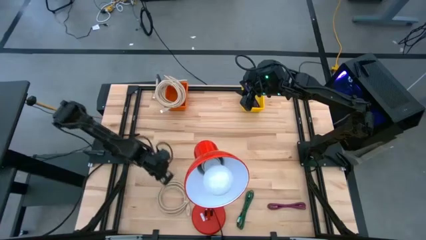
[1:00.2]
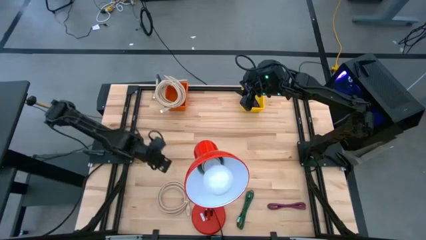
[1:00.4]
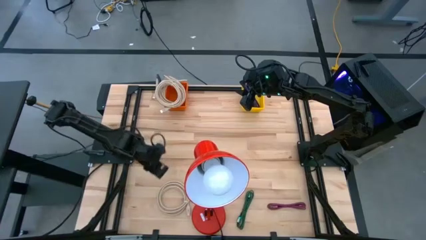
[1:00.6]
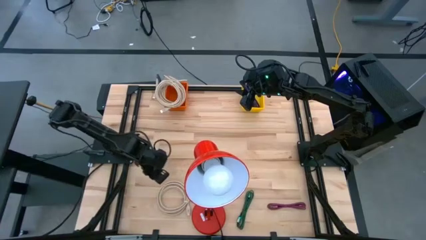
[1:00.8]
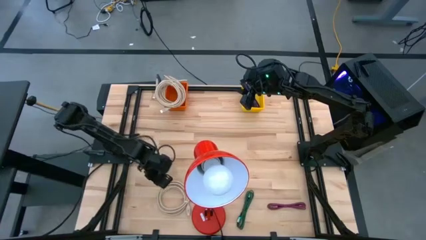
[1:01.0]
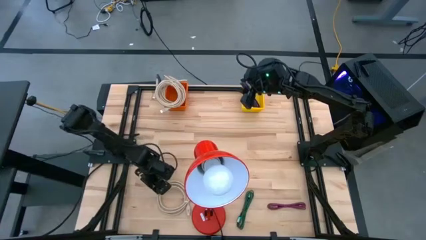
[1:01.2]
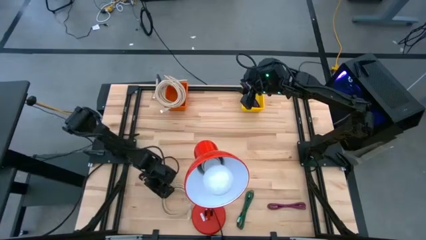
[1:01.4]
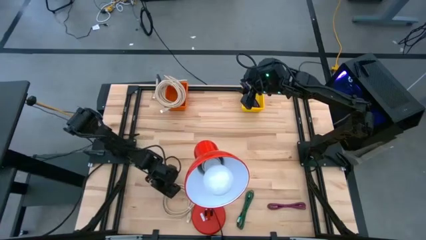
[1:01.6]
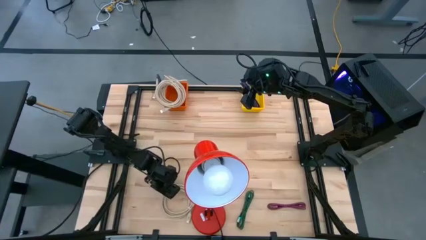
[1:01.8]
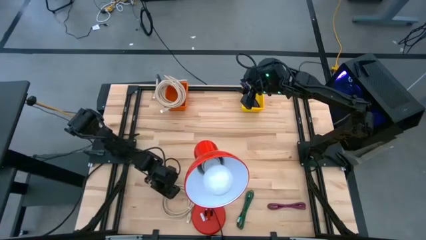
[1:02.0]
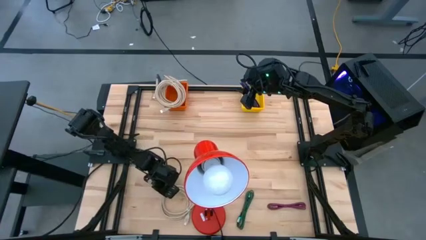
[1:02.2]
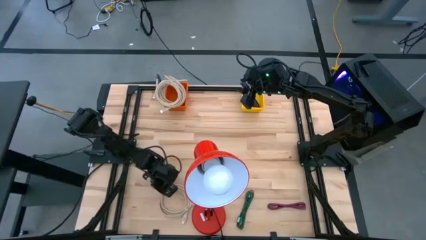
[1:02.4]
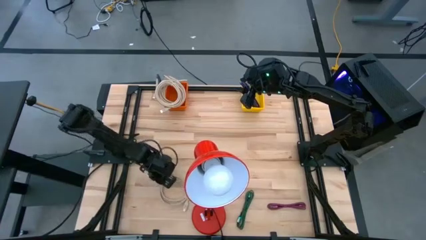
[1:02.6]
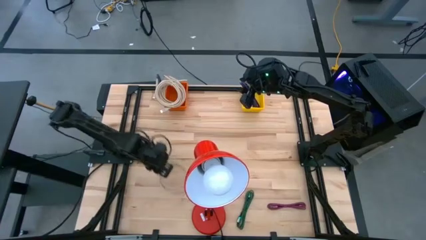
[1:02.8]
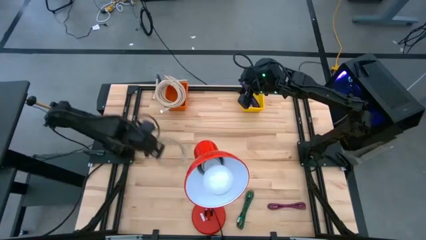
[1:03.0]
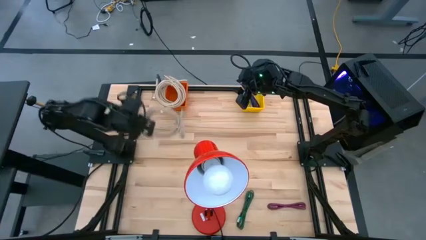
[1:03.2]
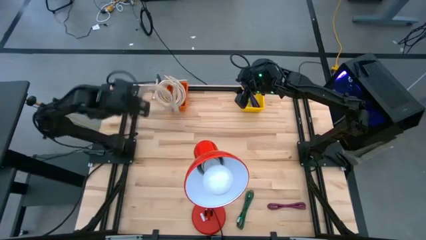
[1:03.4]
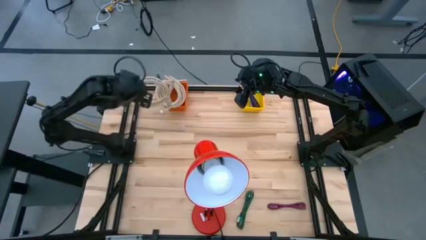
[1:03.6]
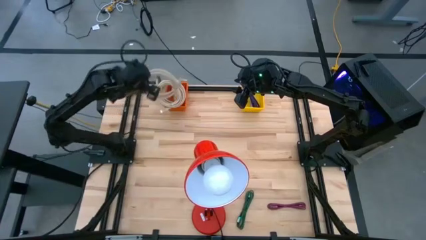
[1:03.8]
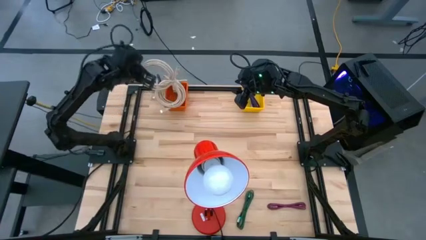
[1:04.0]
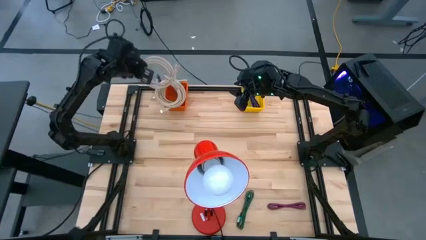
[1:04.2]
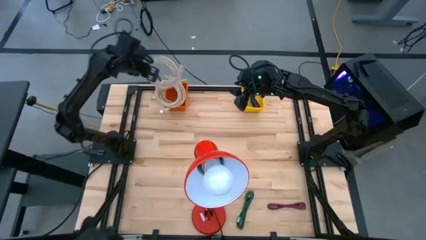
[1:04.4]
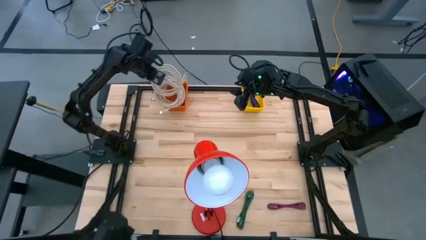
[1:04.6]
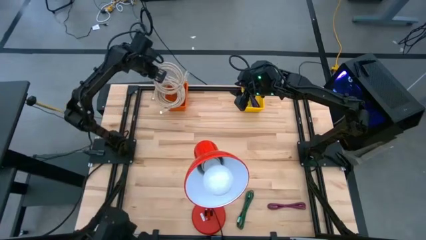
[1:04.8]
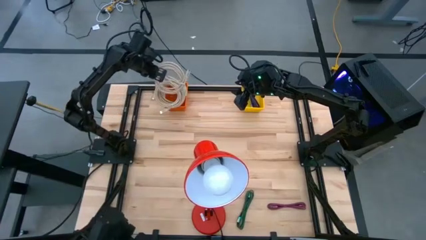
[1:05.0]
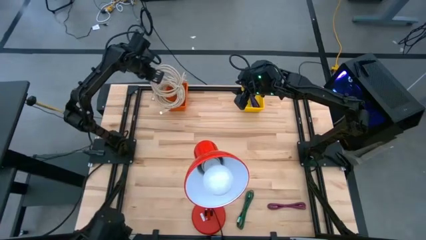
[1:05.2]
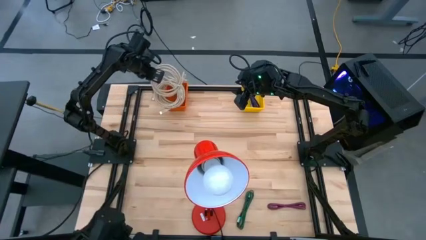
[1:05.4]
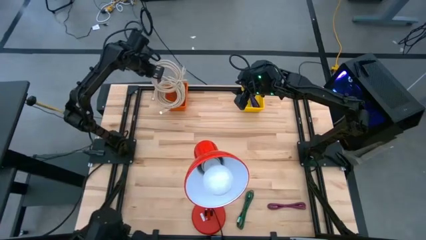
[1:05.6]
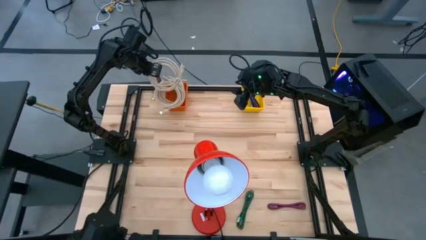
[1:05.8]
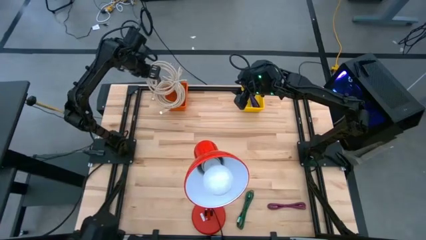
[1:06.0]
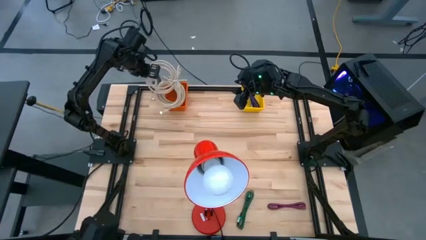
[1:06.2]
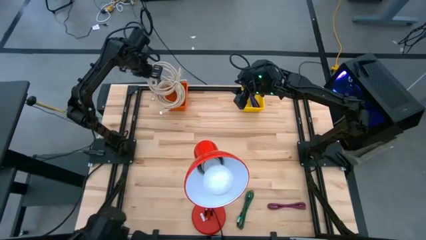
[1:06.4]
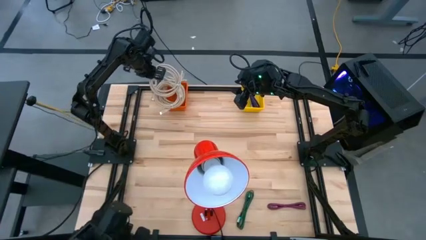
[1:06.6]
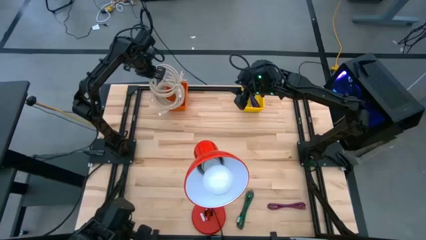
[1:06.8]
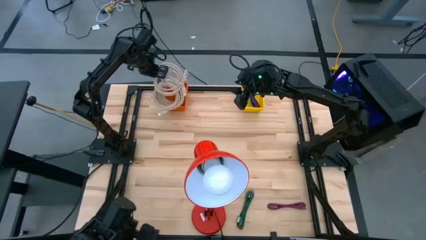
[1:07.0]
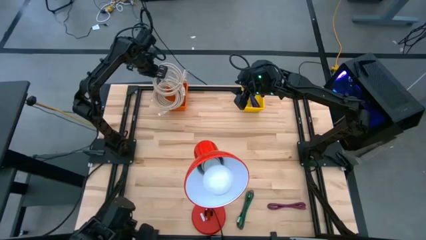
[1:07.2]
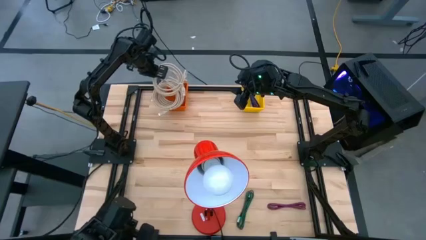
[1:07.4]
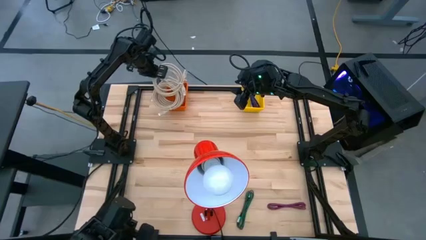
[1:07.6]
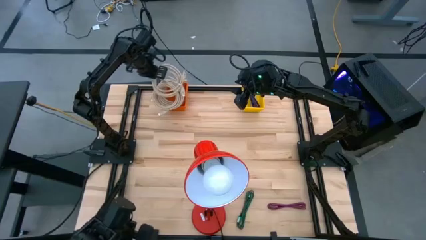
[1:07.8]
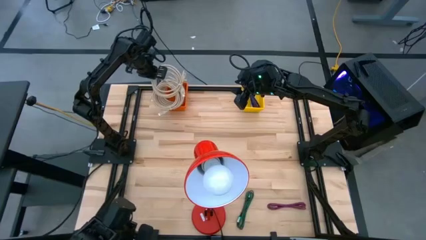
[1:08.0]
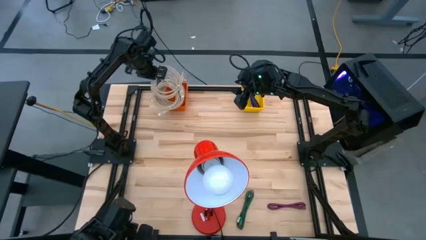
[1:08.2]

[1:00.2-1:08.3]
Task: Pick & Place USB Port
Put the brown HDMI cable into the orange bin

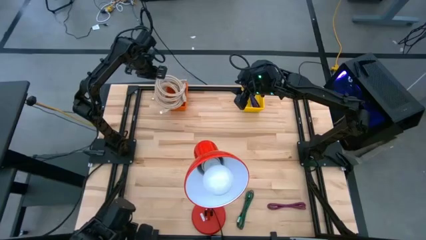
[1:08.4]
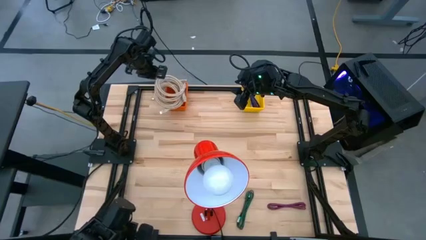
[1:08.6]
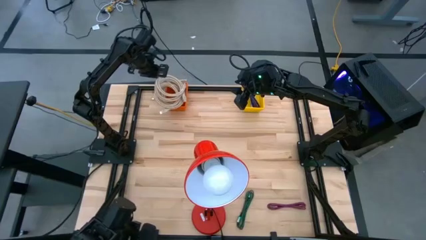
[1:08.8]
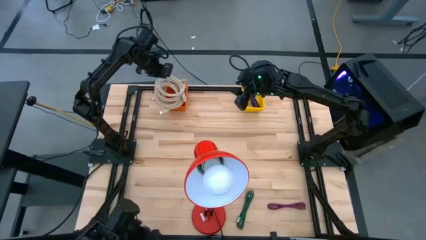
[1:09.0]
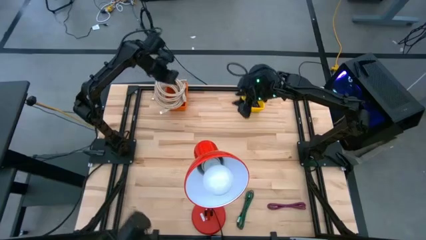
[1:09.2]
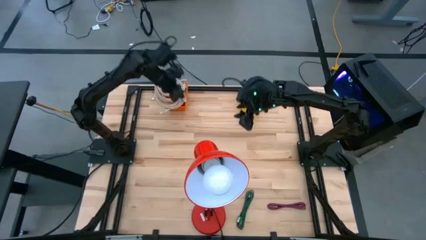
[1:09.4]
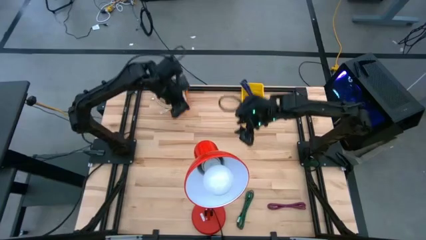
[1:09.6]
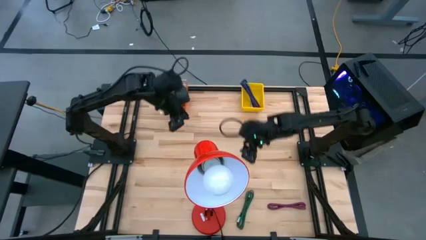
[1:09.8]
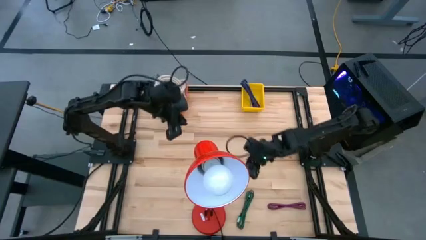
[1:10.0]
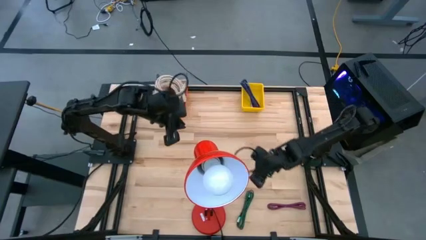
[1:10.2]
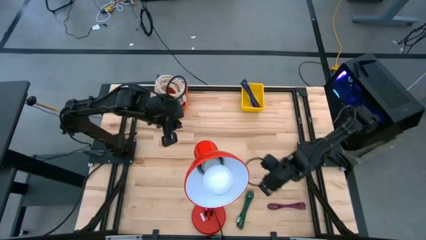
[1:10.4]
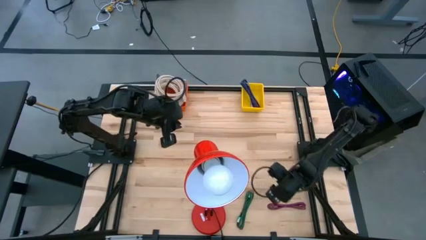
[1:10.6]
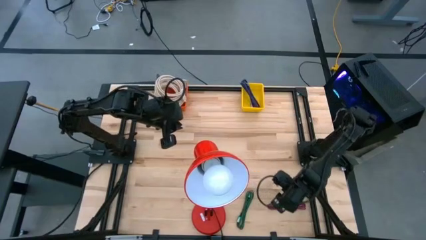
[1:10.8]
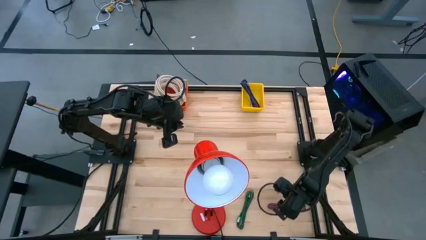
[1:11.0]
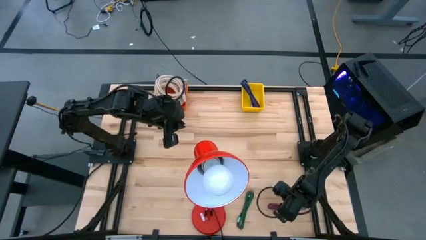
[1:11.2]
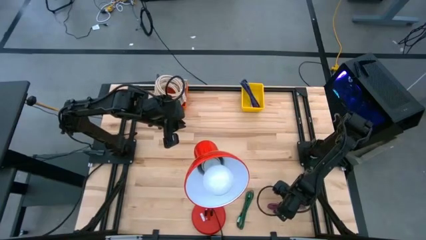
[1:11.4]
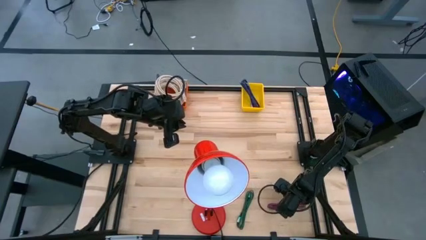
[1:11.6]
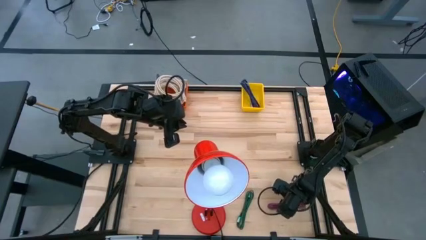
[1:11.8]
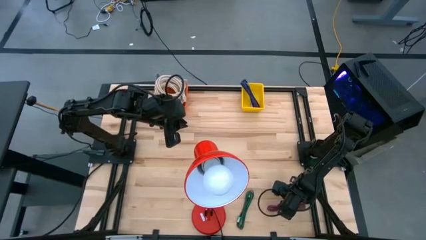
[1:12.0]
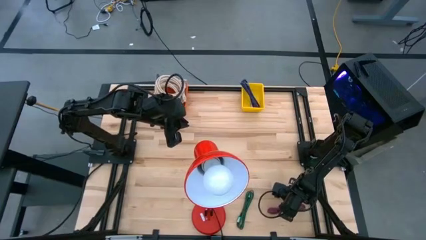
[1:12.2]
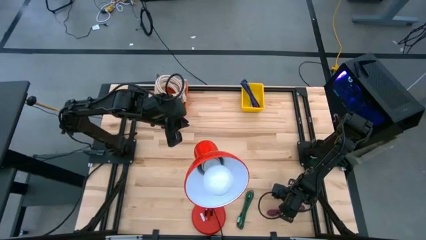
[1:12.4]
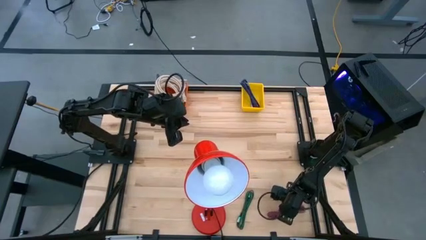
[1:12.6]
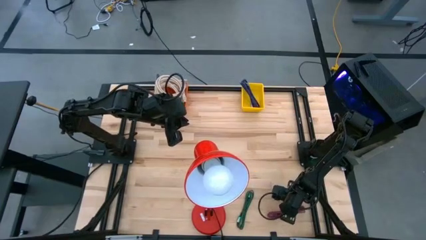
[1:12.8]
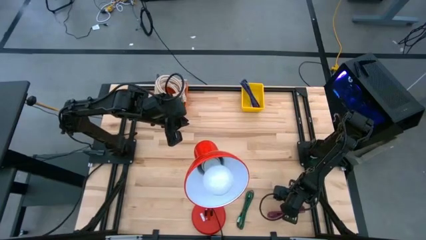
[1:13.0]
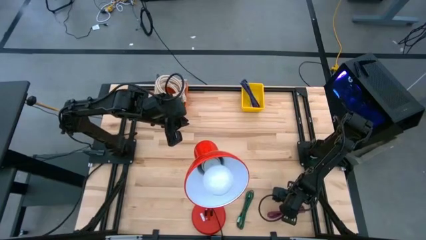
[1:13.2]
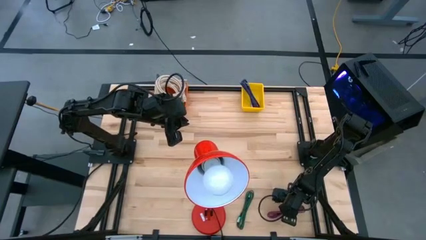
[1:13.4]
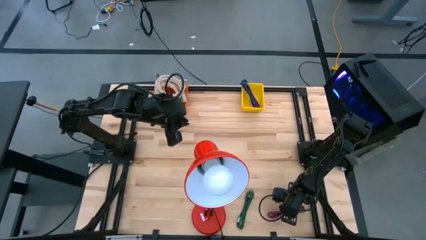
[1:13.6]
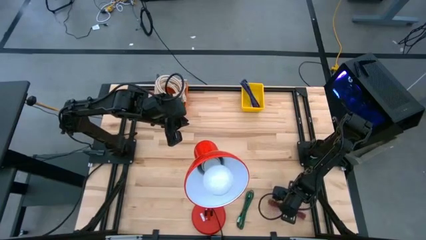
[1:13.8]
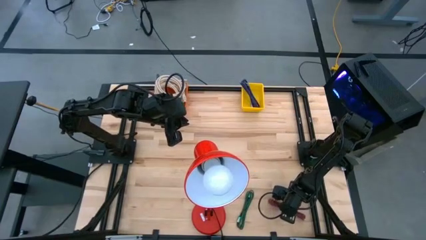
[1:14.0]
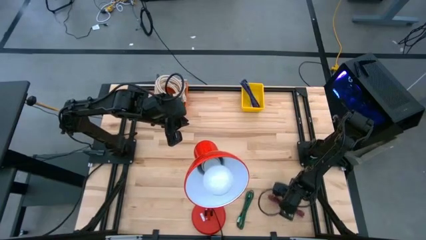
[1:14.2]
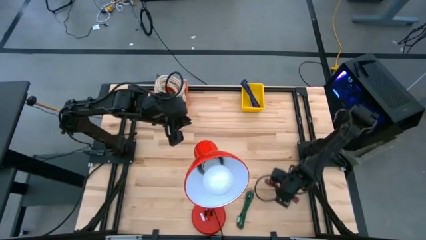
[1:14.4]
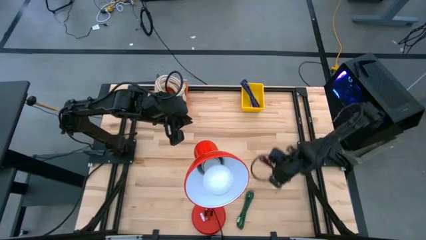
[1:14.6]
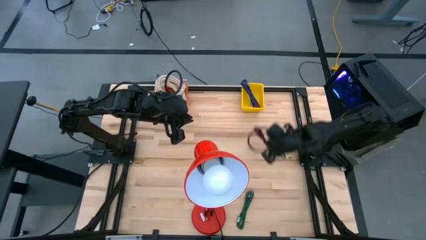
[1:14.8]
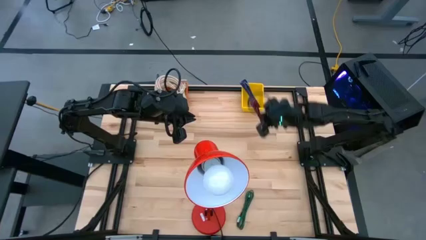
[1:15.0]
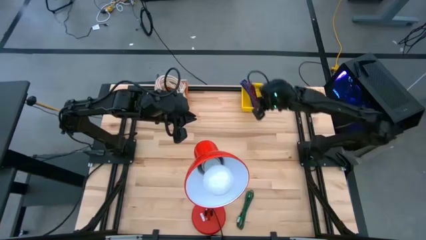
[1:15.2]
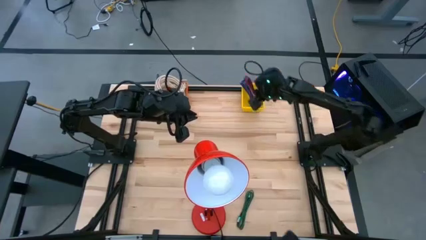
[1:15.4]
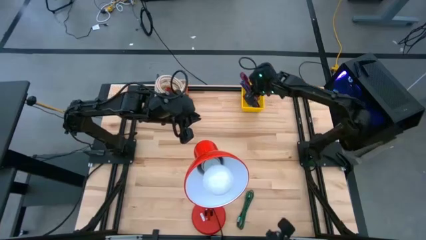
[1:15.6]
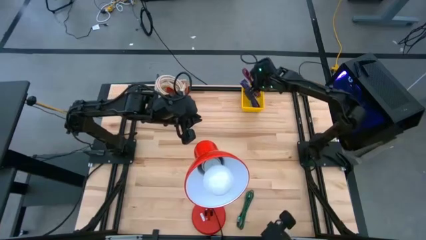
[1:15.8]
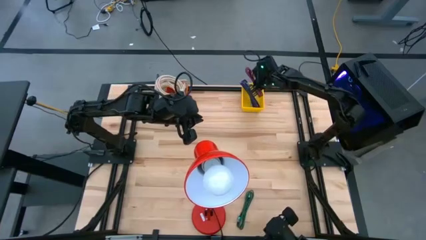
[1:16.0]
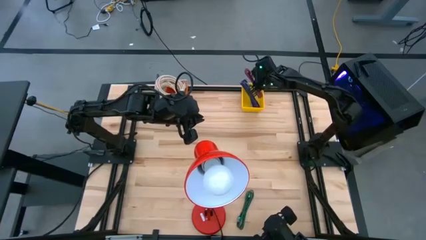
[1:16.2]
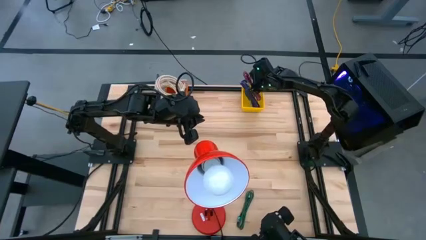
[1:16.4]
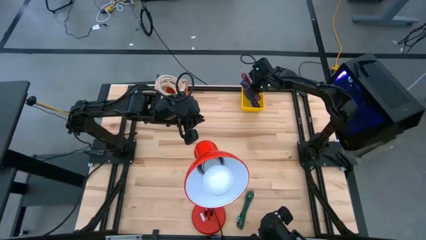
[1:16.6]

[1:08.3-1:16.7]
Put the pink USB cable into the yellow bin
